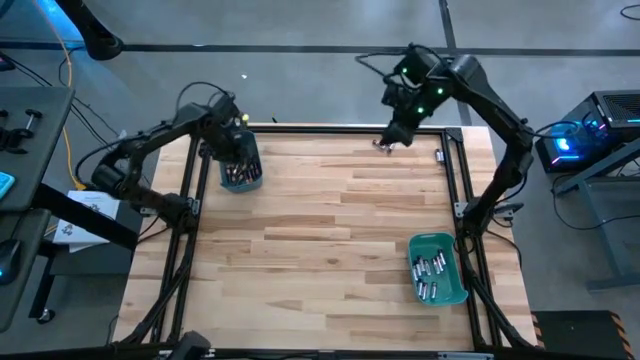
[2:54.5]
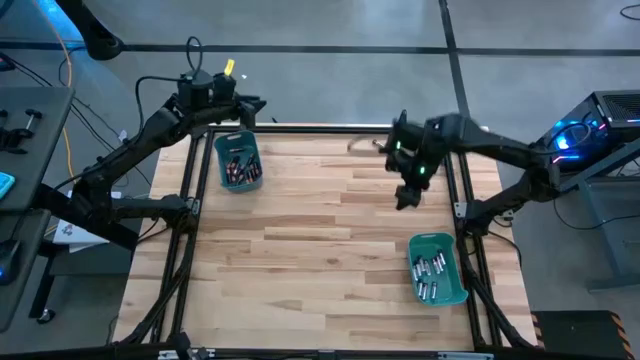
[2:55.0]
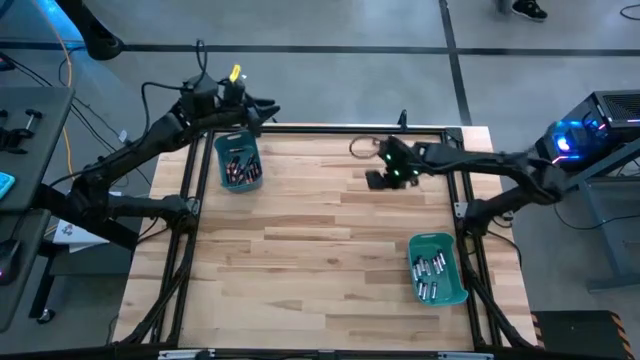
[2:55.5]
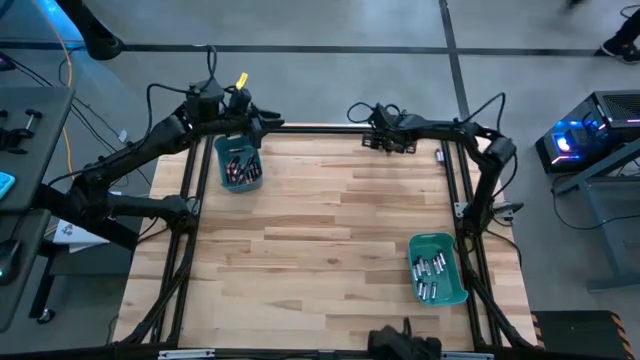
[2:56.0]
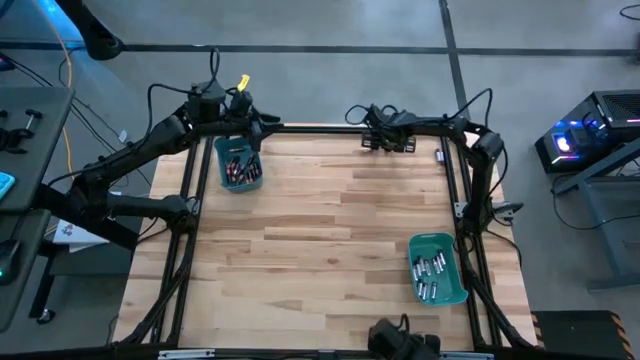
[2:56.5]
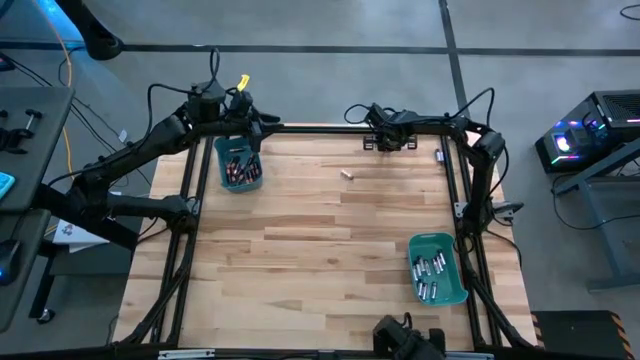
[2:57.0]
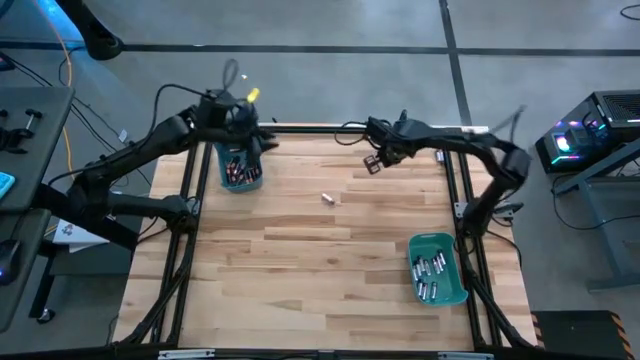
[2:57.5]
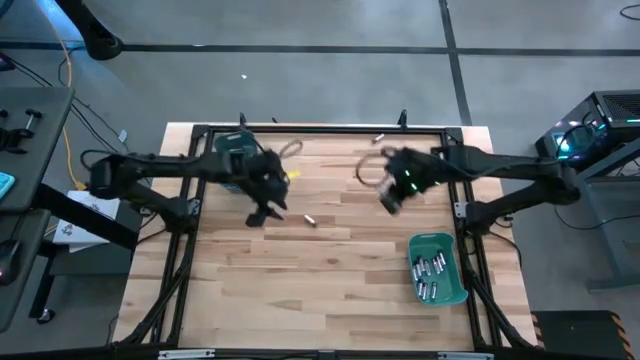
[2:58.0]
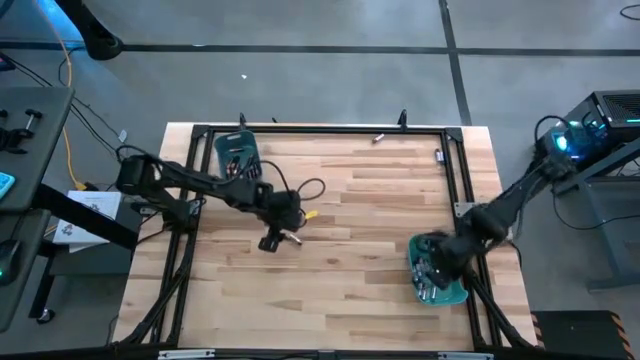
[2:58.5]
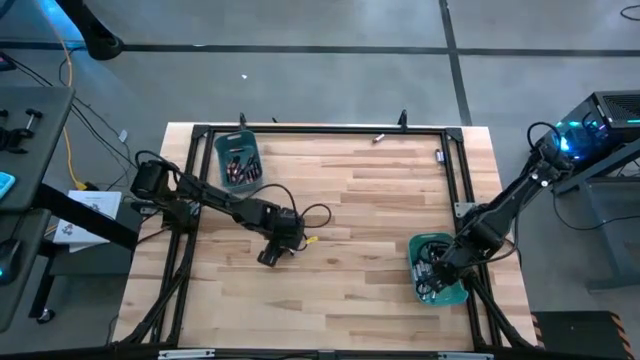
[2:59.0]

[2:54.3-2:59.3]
Task: Sort batteries
Put the silver battery into the green bin

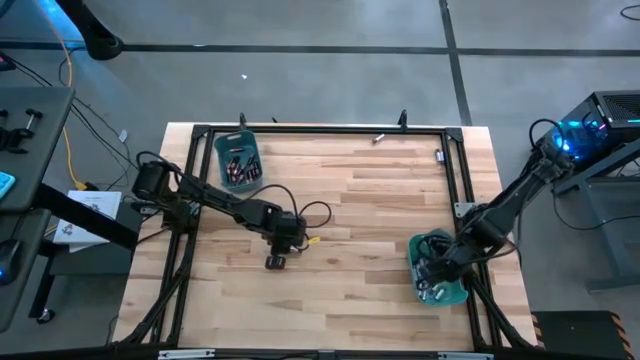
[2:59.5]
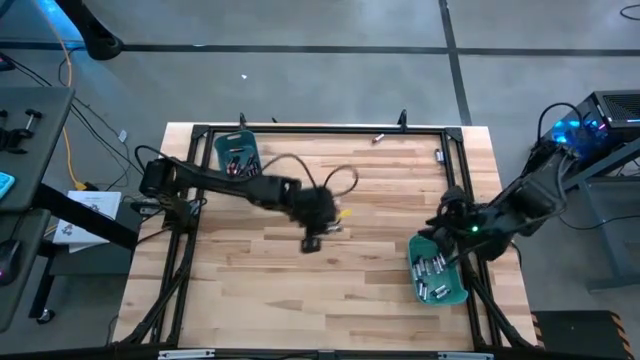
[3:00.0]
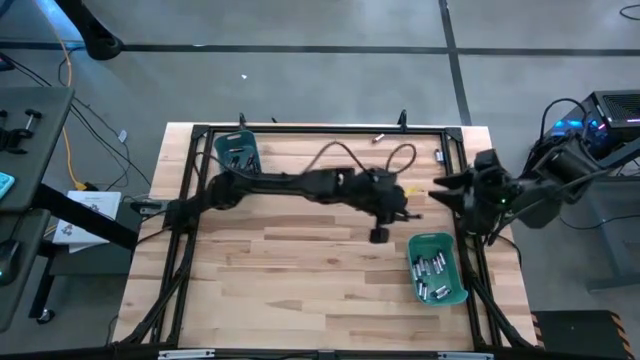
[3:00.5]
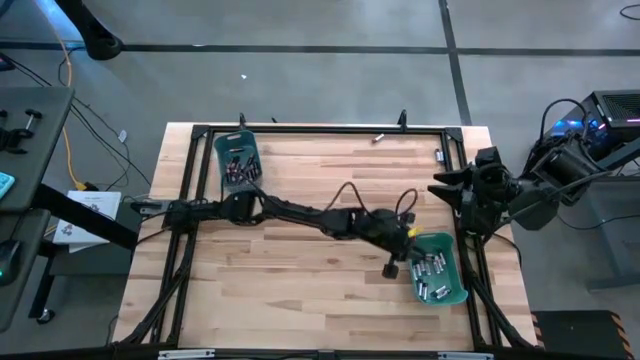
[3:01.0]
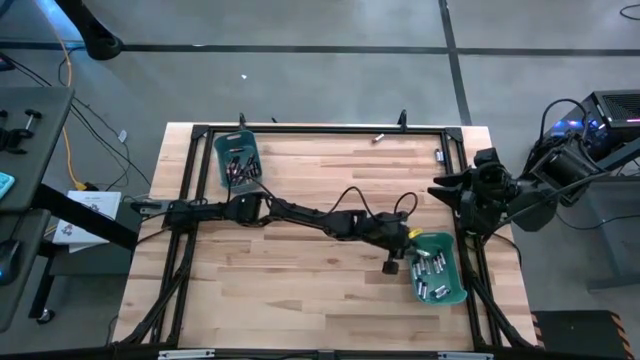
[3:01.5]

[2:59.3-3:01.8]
Put the silver battery into the green bin

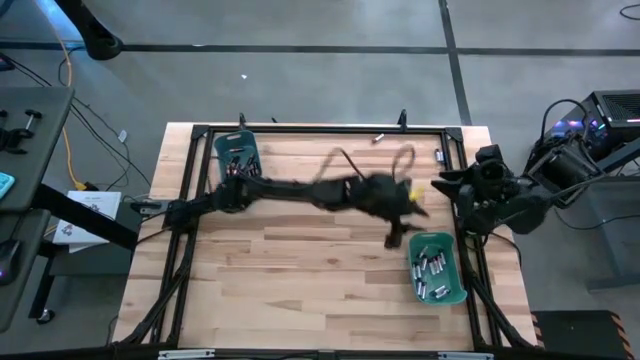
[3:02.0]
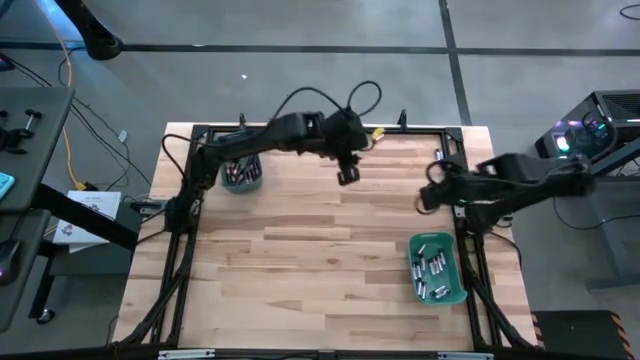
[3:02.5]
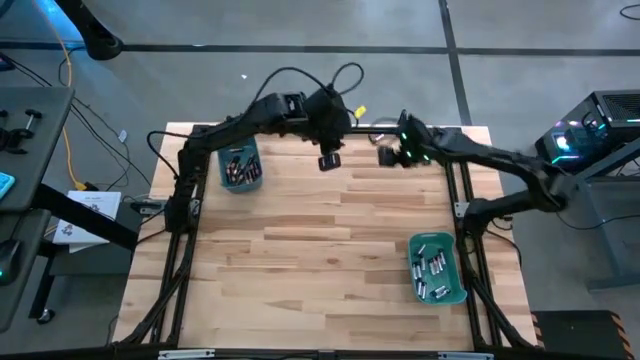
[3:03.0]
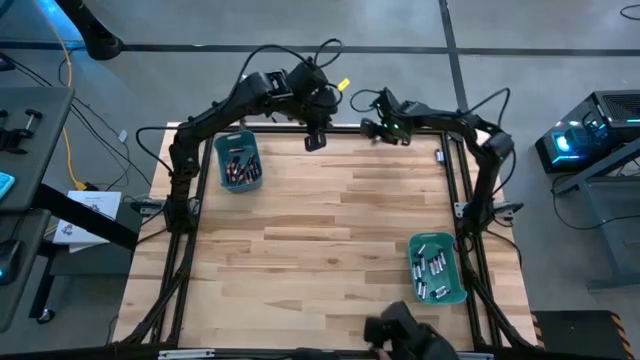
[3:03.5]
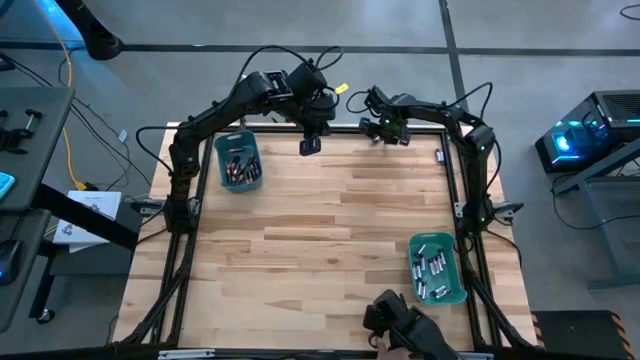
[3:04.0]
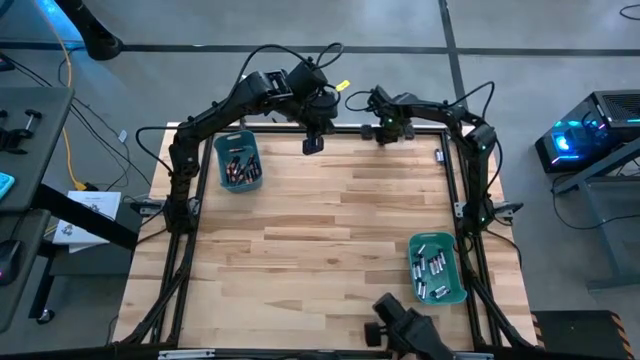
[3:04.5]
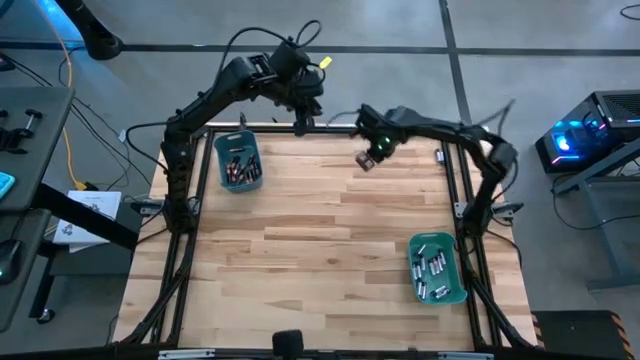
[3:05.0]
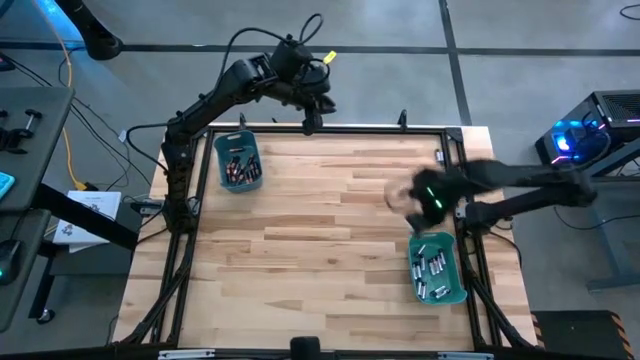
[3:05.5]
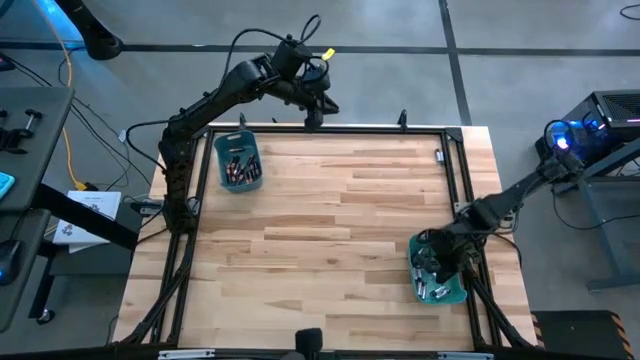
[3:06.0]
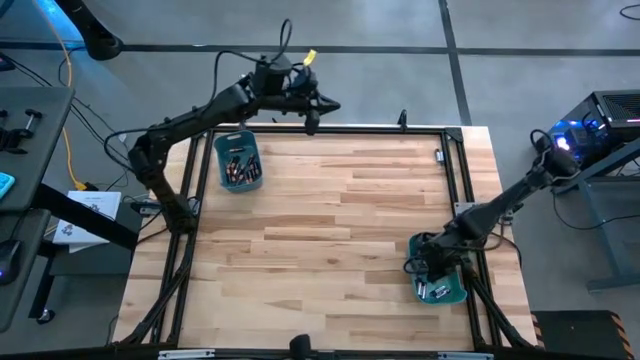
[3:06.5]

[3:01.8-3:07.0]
Put the silver battery into the green bin

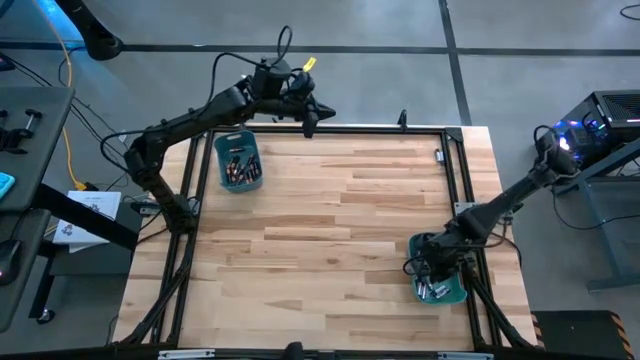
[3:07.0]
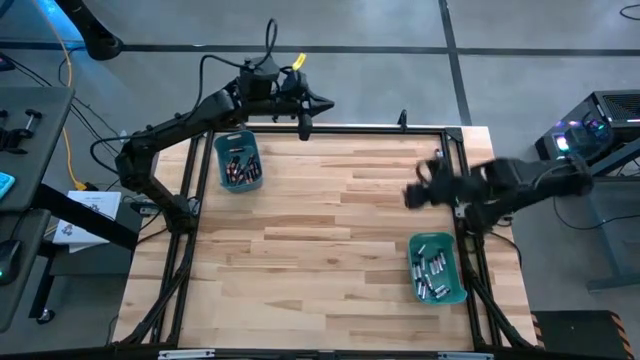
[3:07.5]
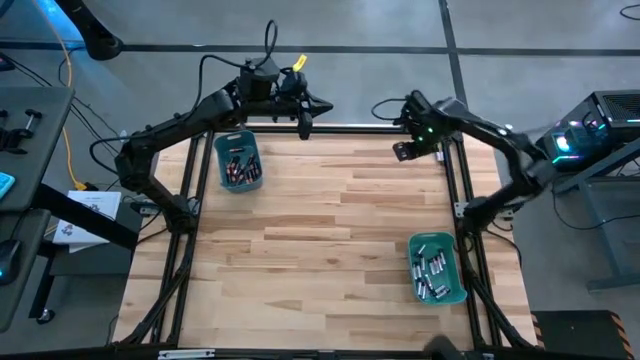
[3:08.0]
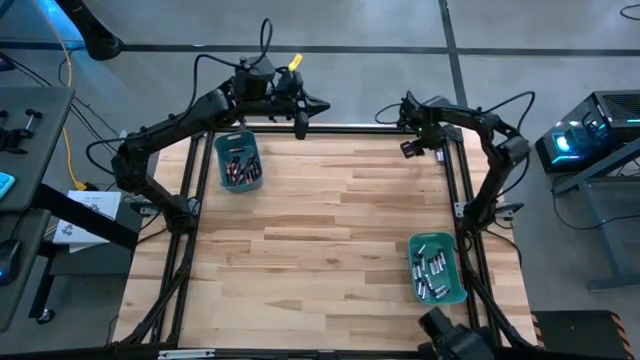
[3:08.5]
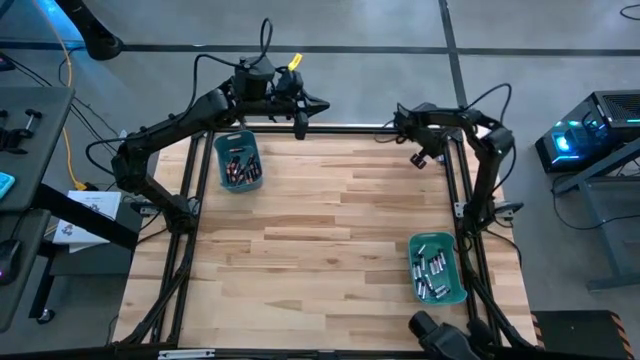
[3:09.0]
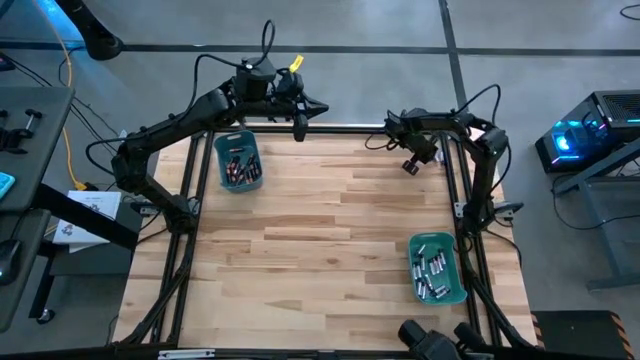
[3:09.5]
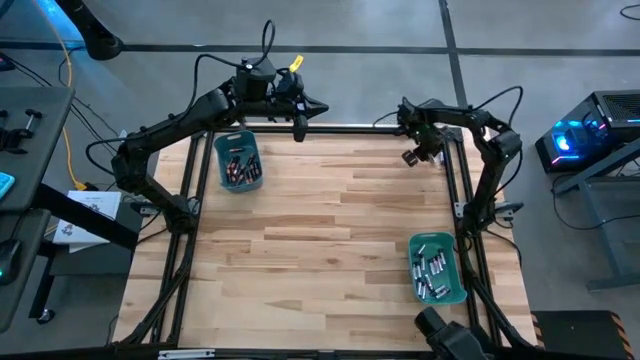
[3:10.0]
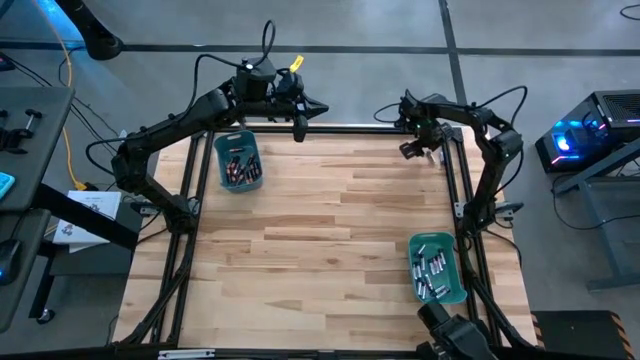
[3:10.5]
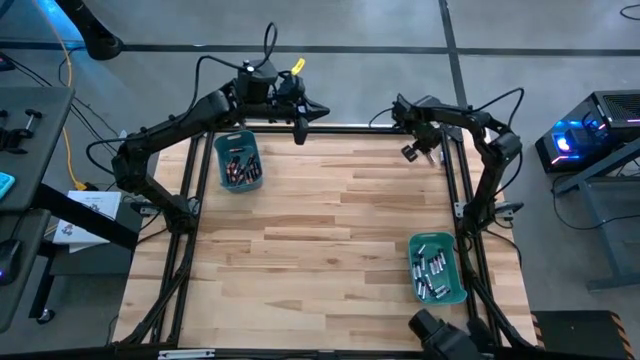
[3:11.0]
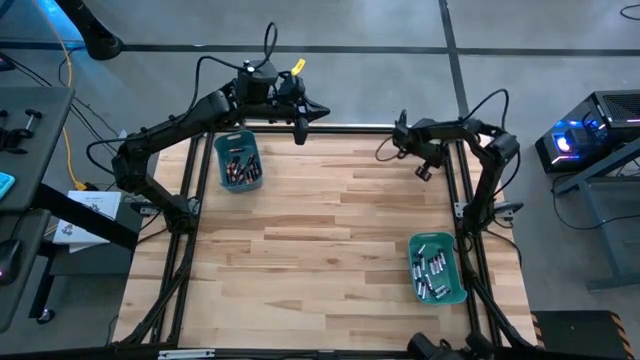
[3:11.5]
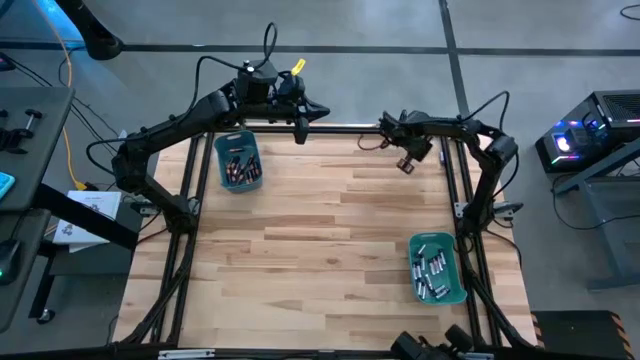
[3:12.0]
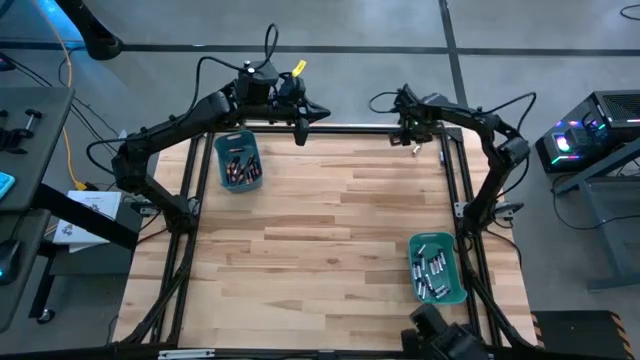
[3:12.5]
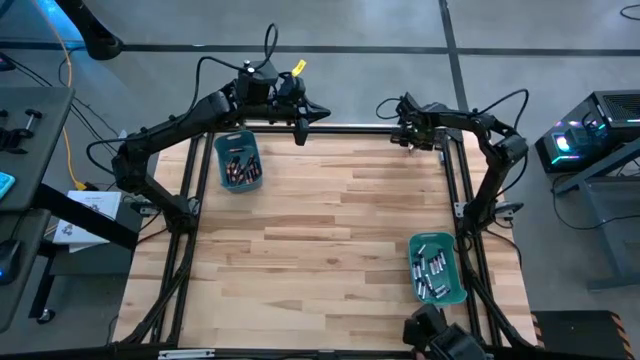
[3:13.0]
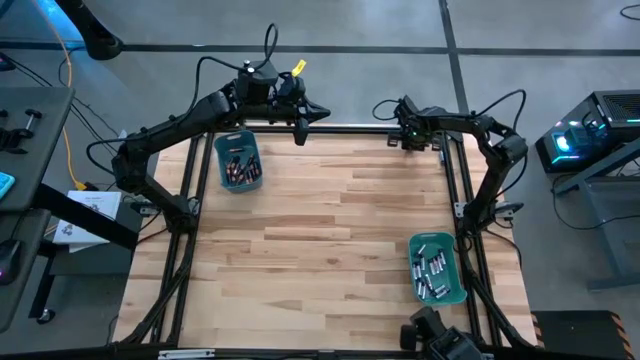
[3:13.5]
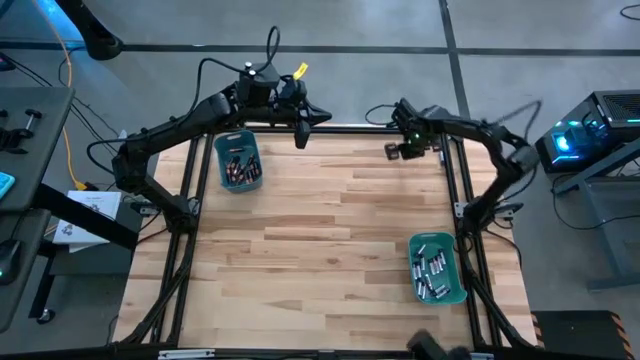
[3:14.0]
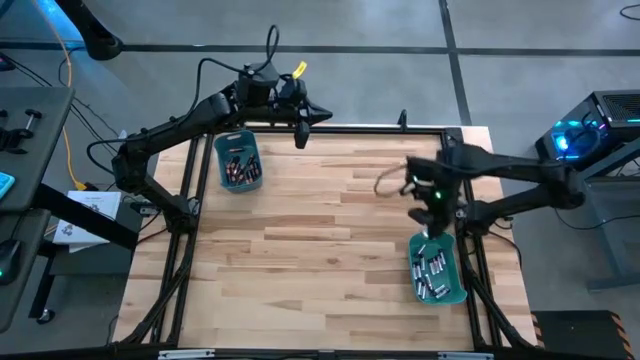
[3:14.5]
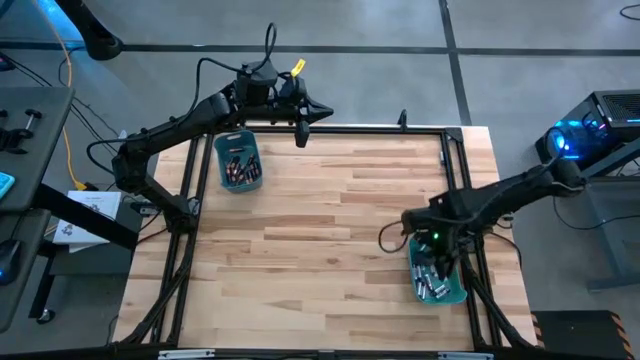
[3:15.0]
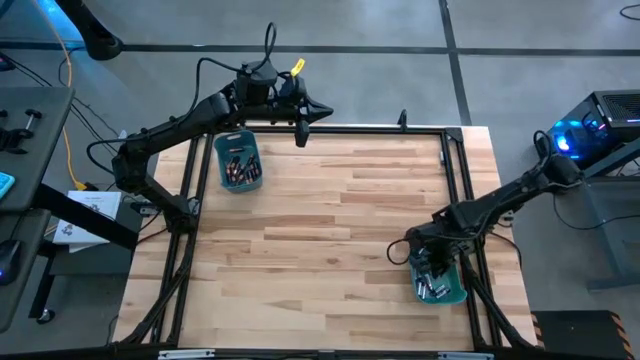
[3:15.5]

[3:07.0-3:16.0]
Put the silver battery into the green bin
